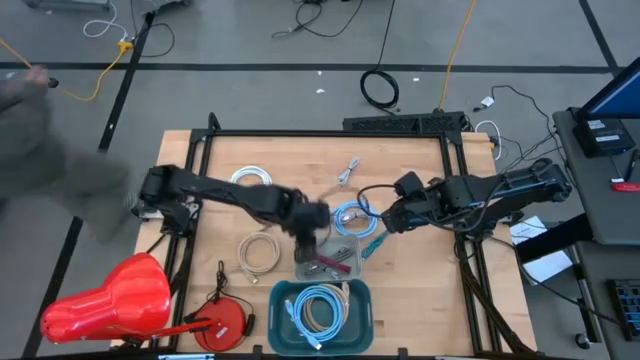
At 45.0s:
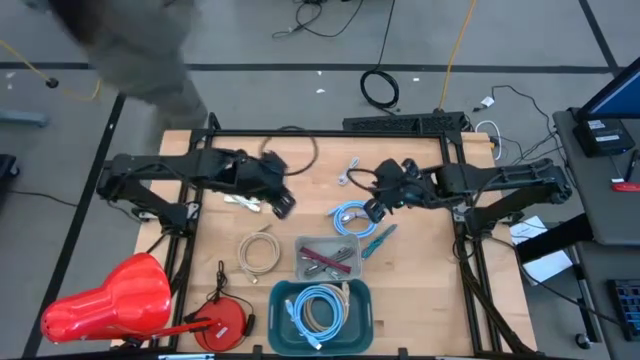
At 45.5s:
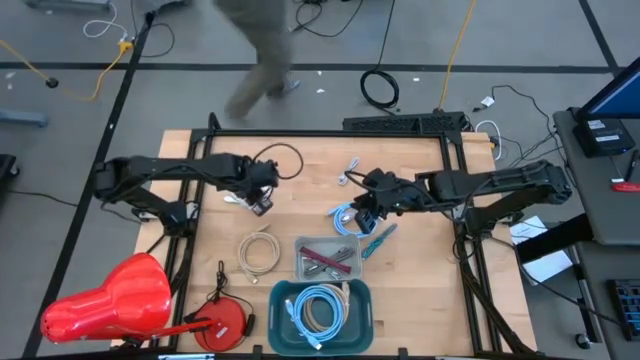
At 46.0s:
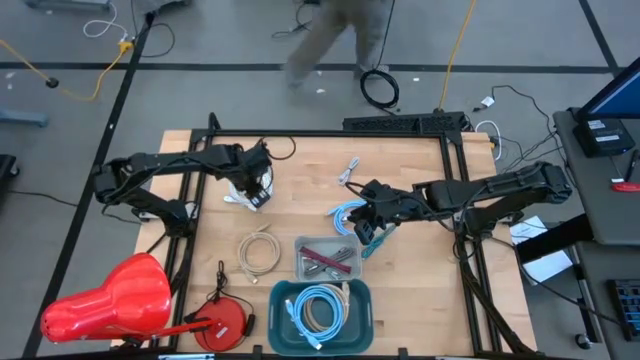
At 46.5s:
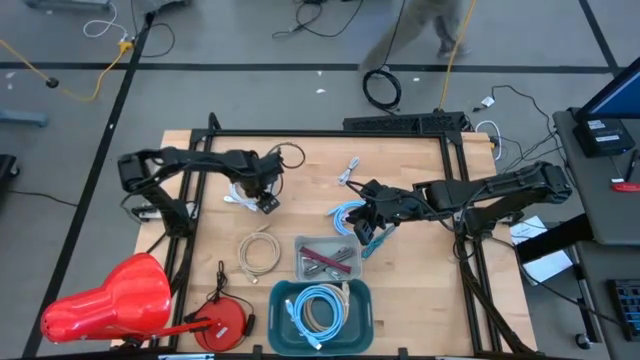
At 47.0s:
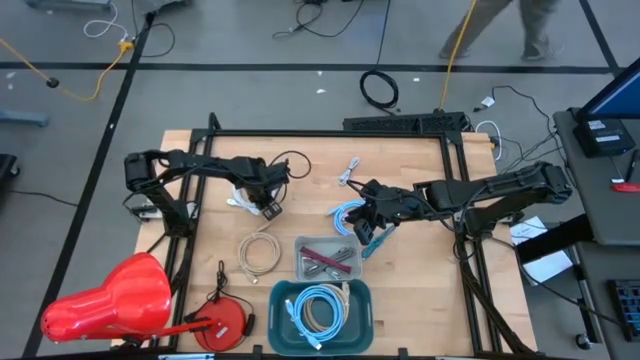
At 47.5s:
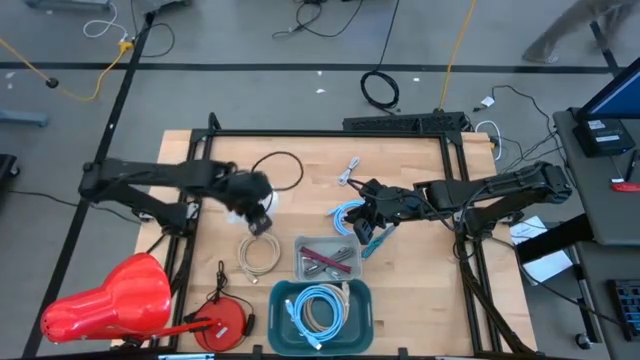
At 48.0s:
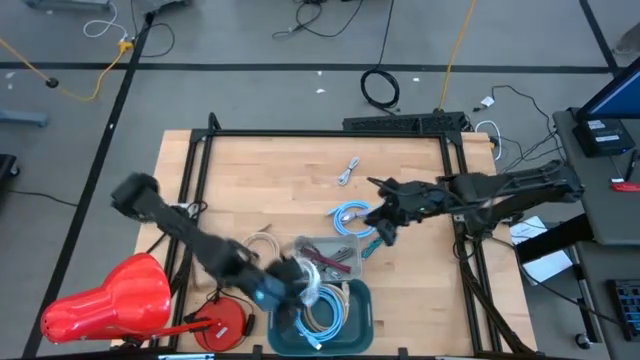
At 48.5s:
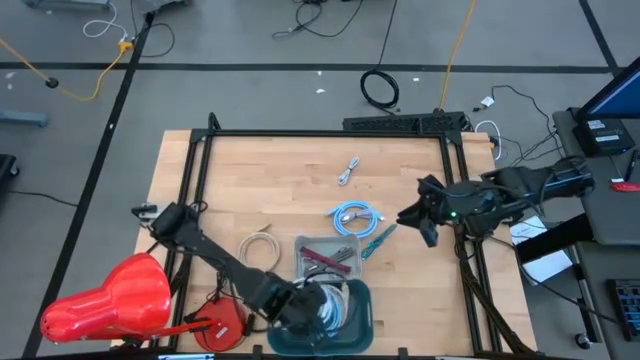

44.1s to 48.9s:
Task: Pick & Place USB Port
Put the white HDMI cable into the blue bin

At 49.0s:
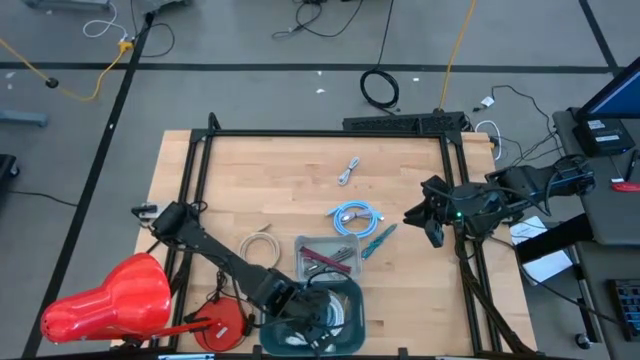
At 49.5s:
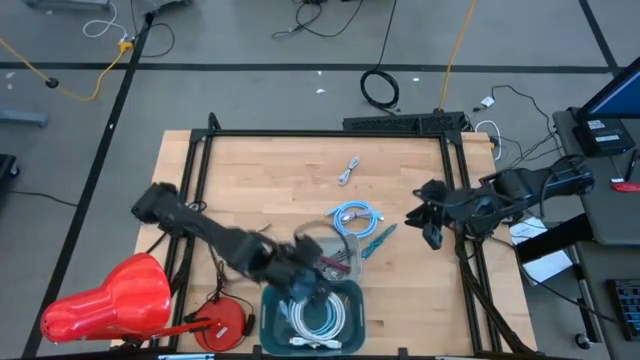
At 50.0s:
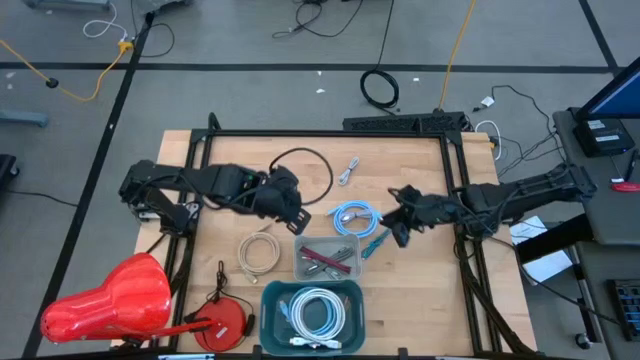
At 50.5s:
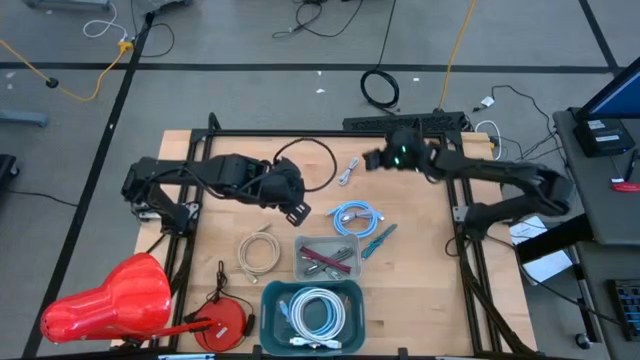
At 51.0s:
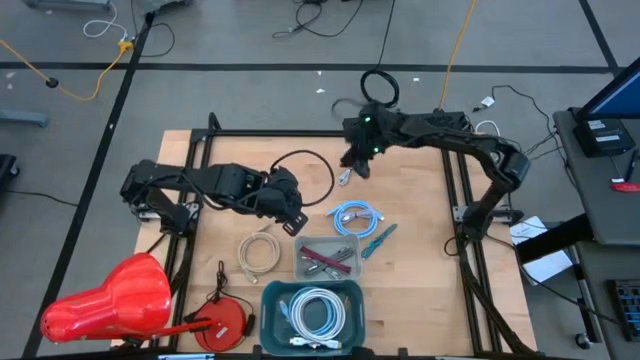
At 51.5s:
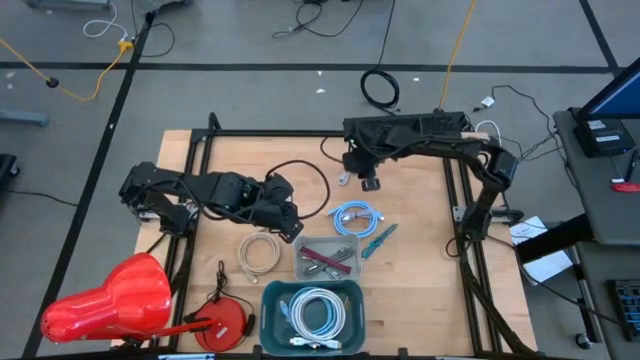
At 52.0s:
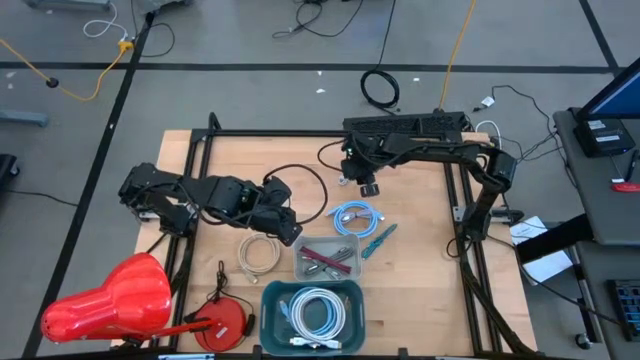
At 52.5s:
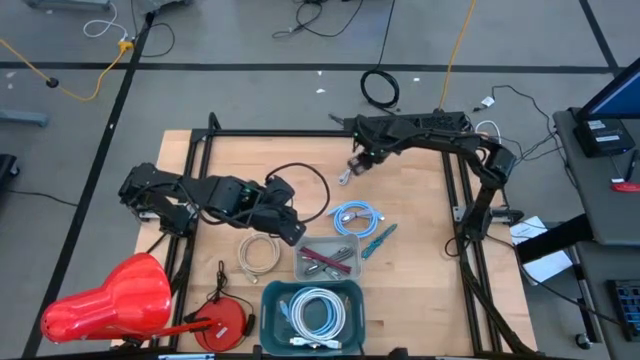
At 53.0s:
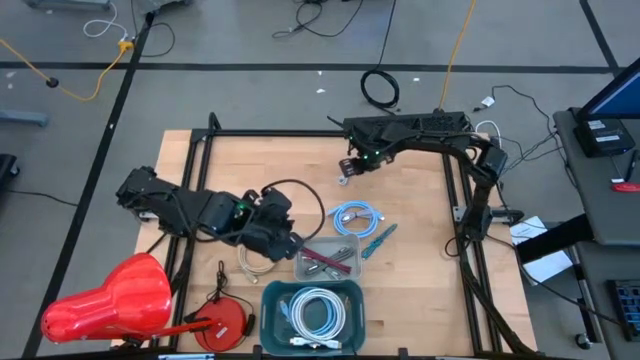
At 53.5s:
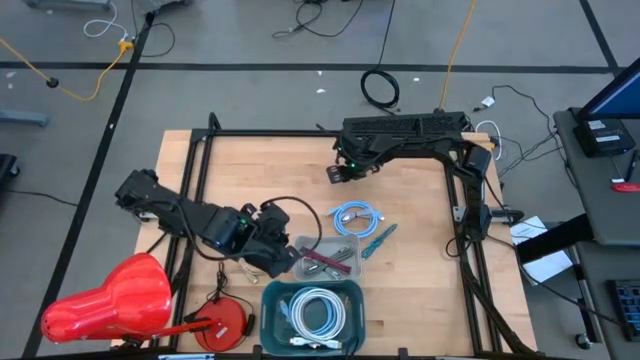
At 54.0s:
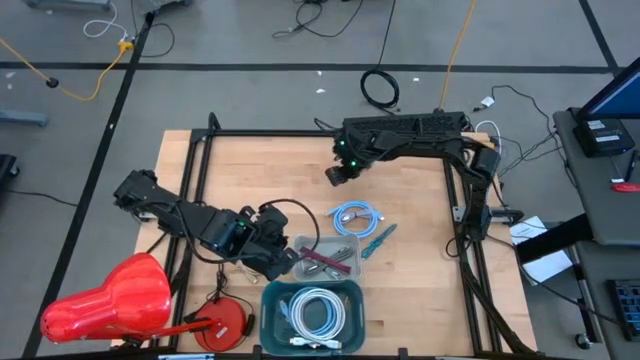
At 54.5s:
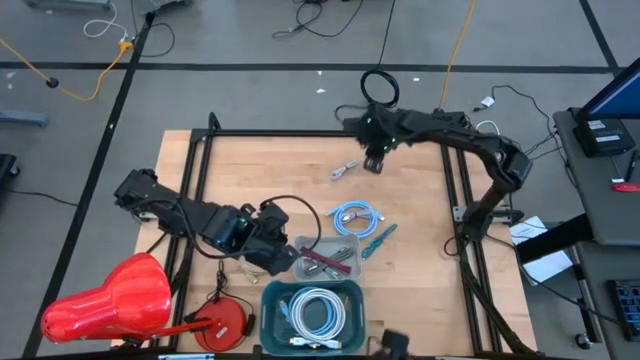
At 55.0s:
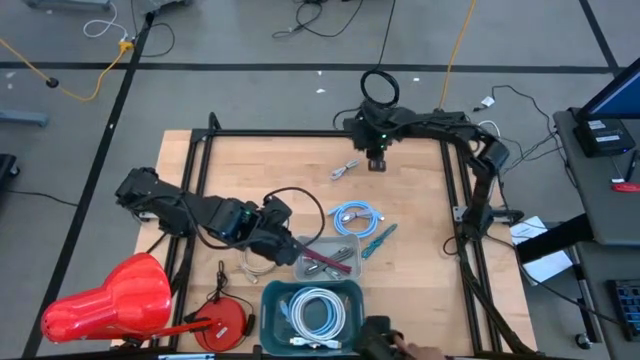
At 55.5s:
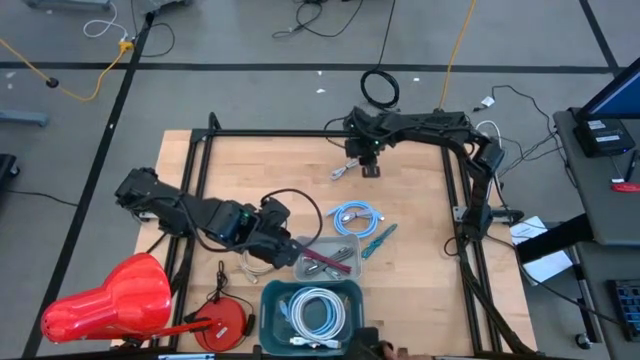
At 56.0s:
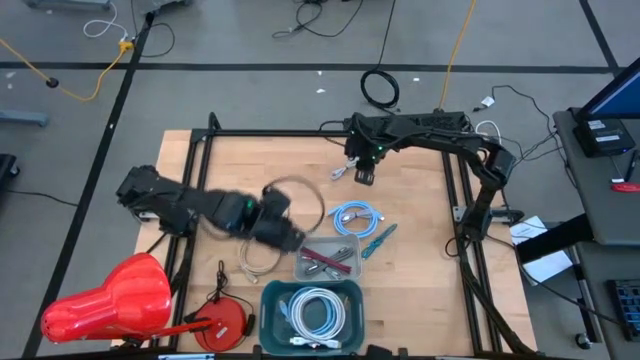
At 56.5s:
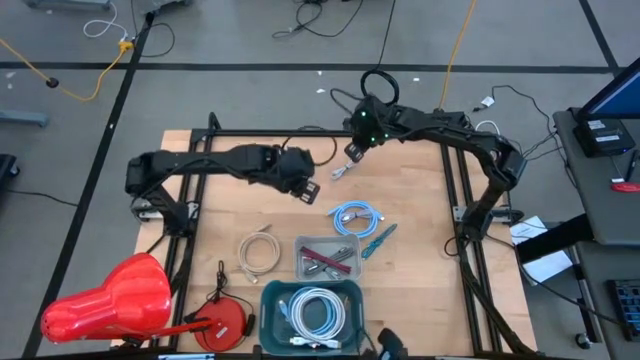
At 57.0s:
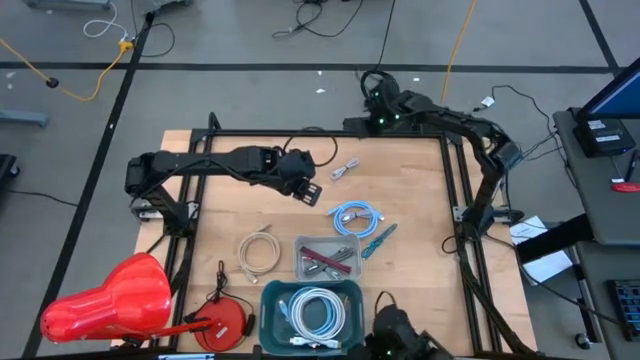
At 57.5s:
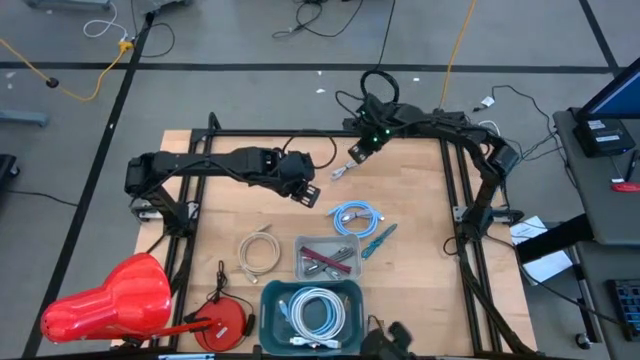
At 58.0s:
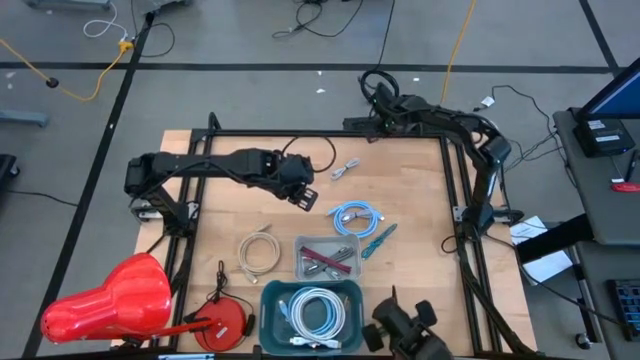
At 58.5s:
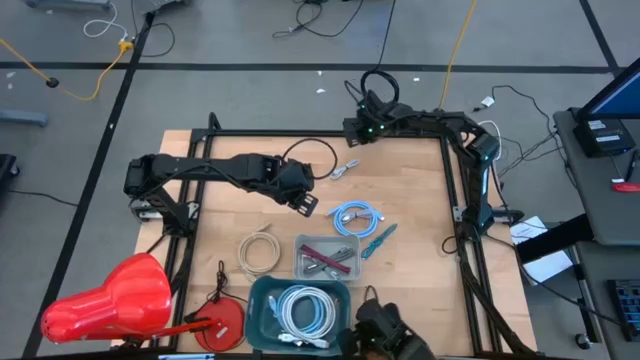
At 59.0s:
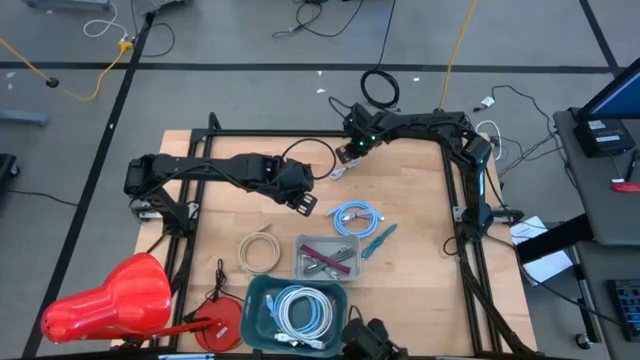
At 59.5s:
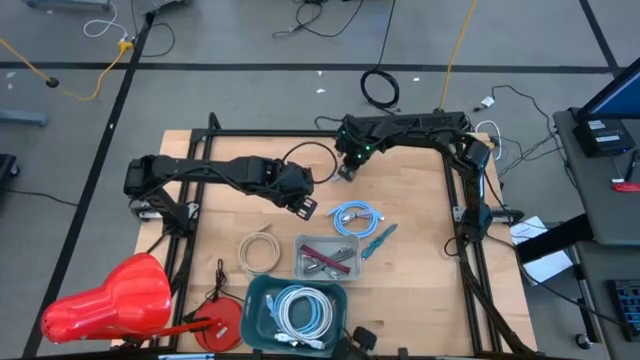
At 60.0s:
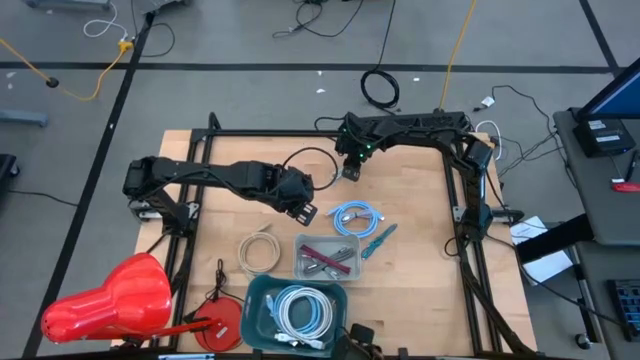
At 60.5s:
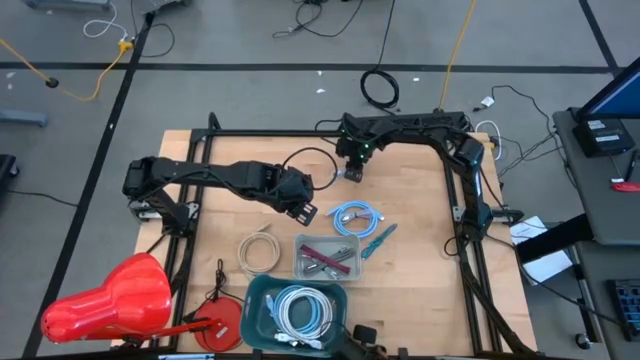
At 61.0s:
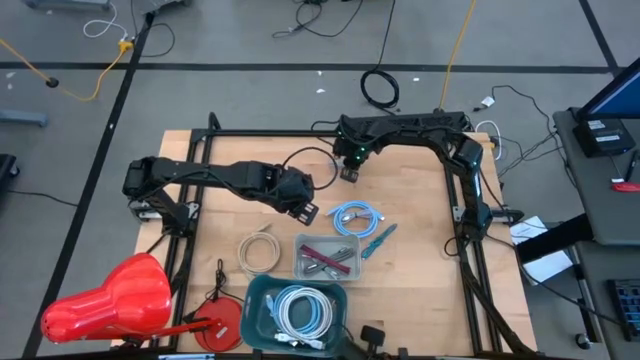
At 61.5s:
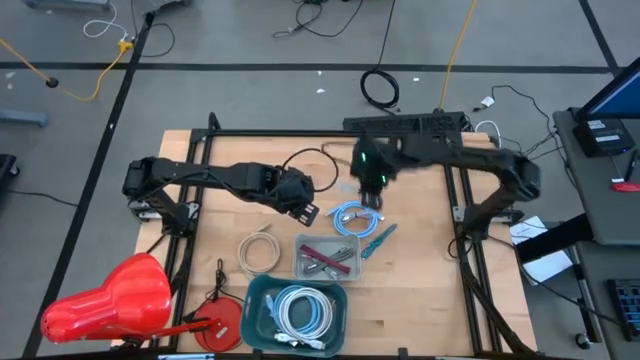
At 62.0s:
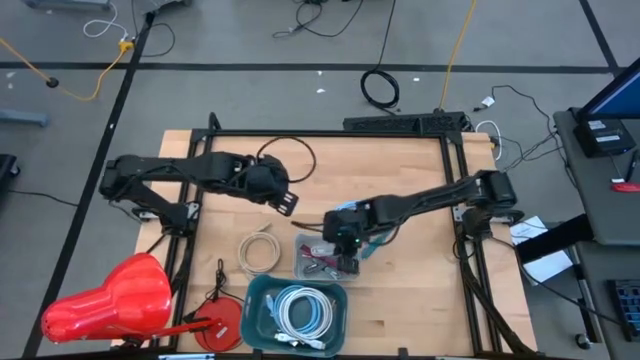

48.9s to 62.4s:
Put the white charger cable into the gray bin

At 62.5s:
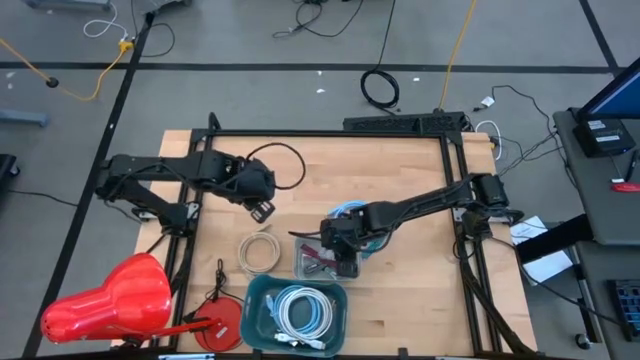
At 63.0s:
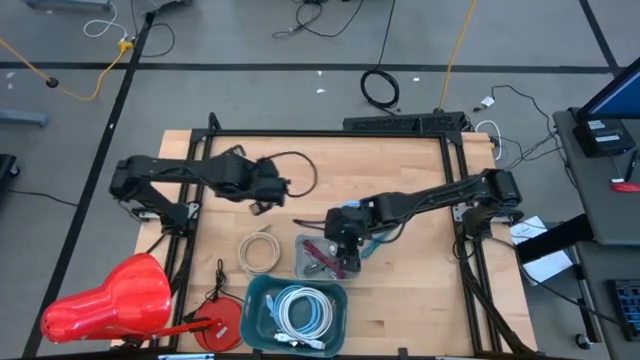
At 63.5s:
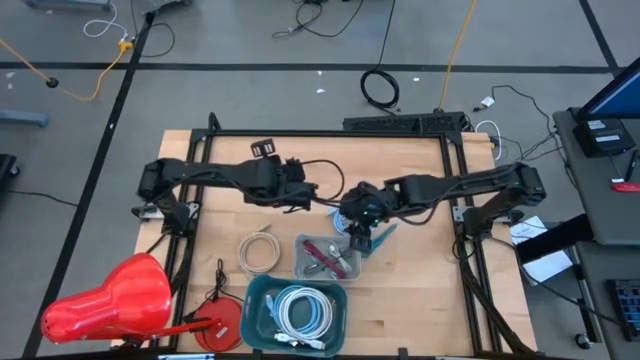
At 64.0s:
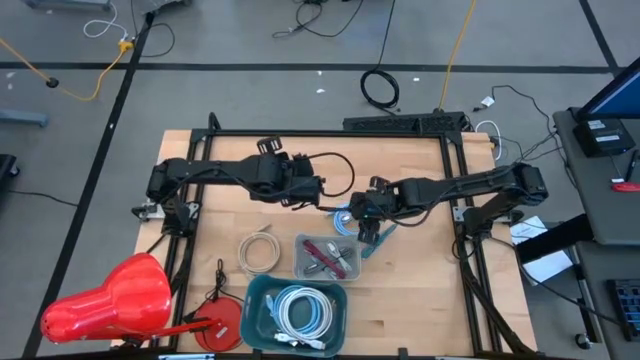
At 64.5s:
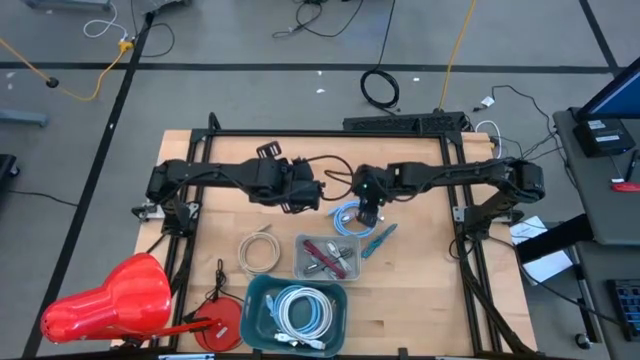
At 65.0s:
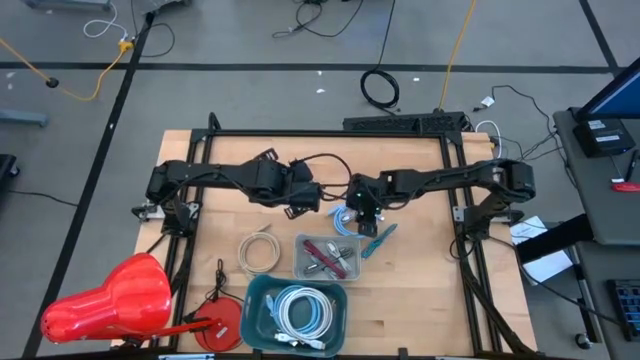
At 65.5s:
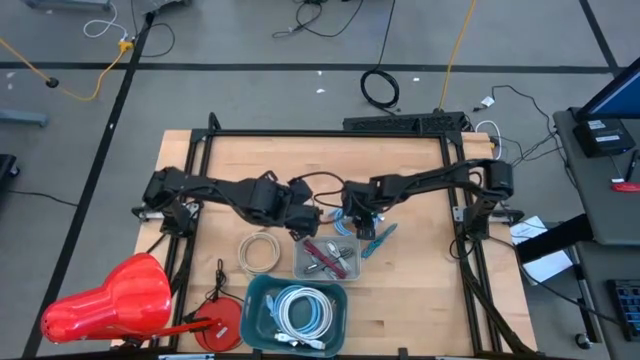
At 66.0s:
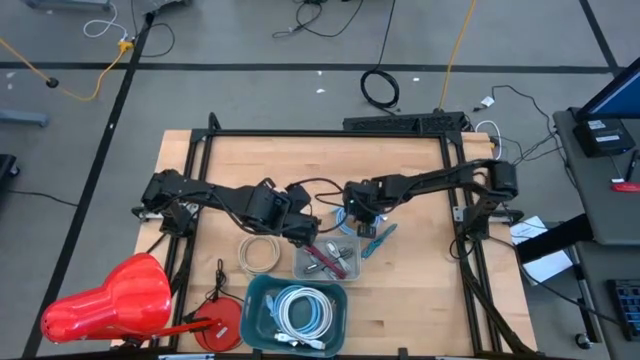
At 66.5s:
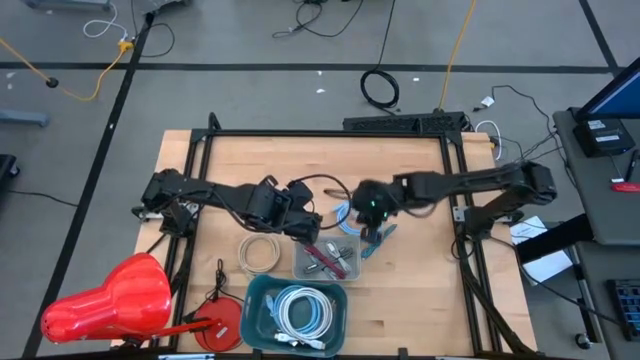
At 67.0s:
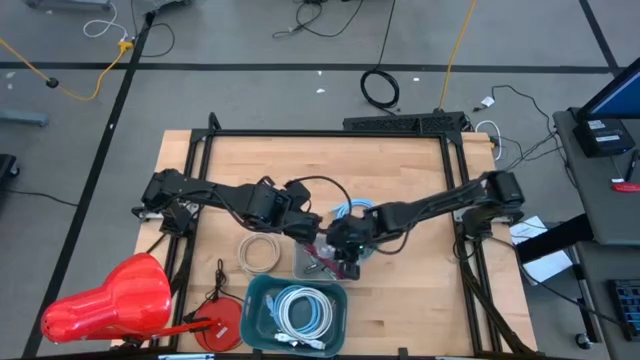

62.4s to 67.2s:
Put the light violet charger cable into the gray bin
